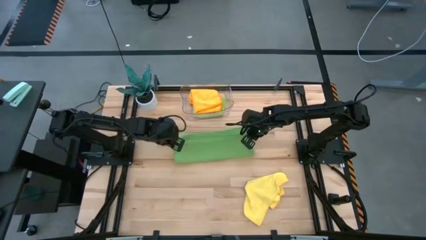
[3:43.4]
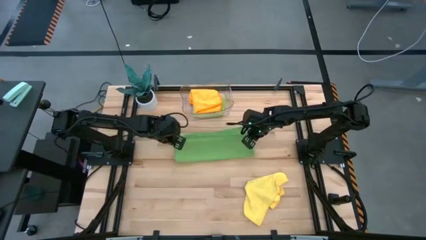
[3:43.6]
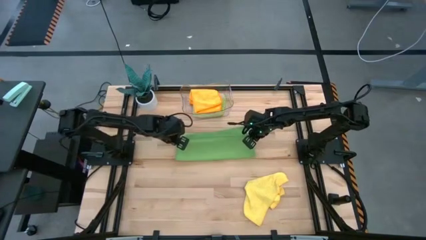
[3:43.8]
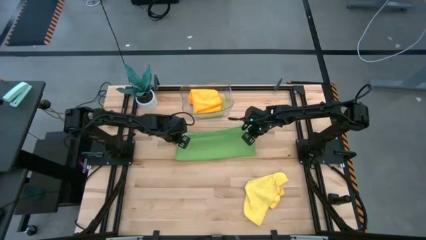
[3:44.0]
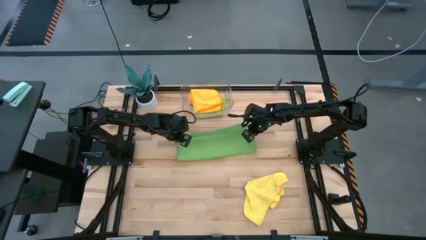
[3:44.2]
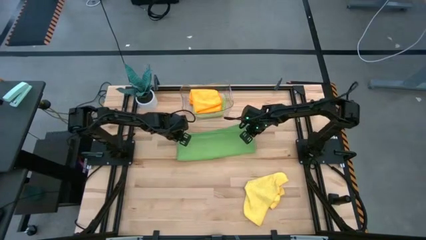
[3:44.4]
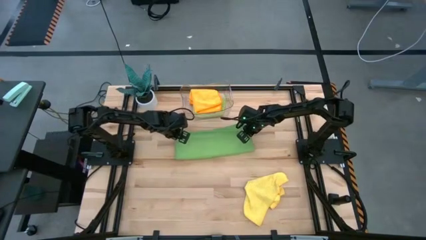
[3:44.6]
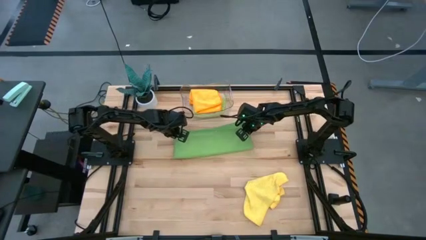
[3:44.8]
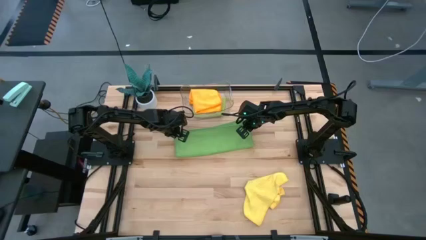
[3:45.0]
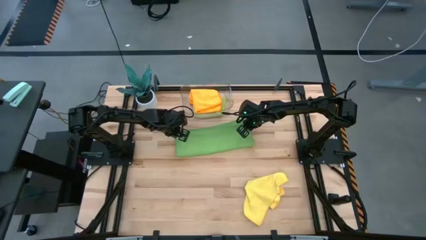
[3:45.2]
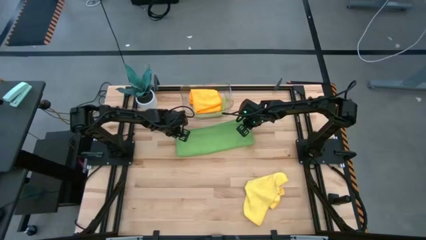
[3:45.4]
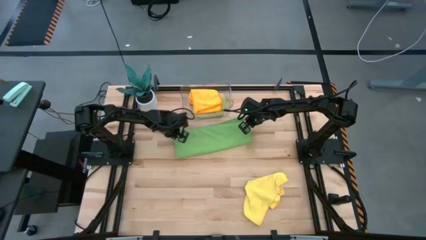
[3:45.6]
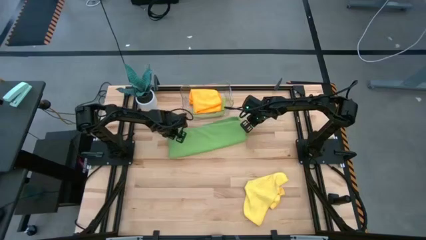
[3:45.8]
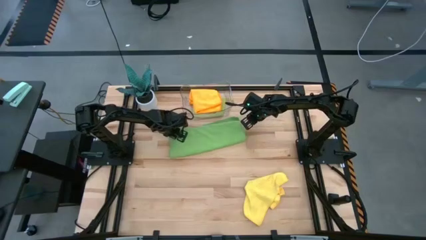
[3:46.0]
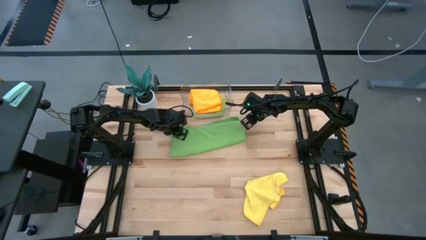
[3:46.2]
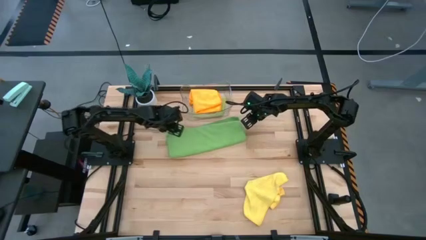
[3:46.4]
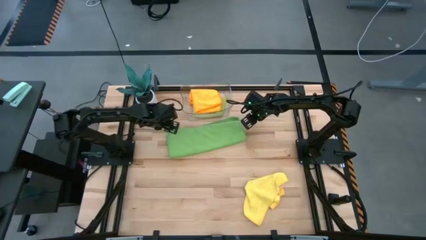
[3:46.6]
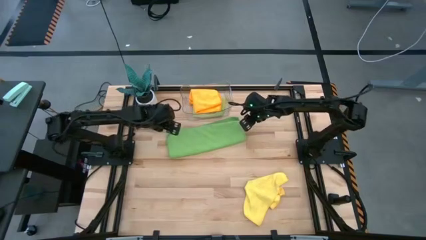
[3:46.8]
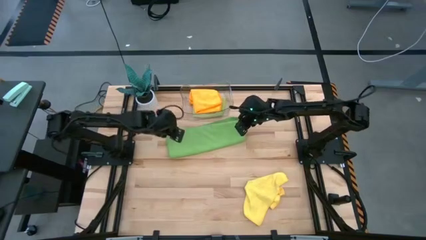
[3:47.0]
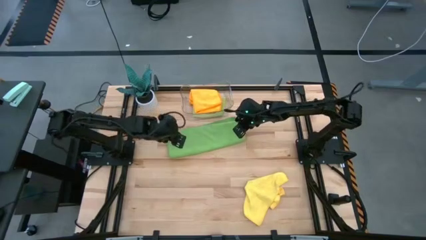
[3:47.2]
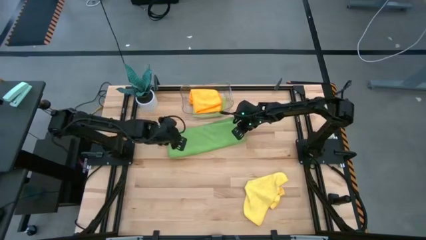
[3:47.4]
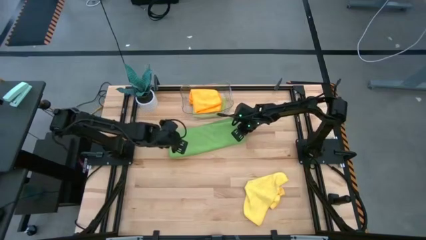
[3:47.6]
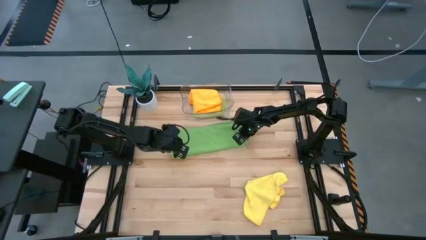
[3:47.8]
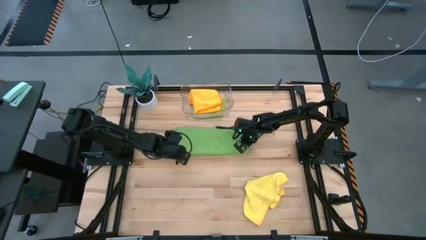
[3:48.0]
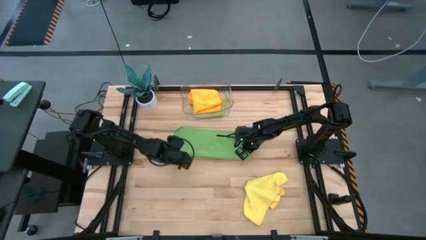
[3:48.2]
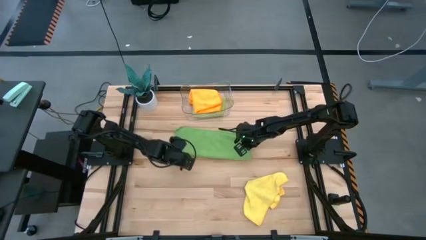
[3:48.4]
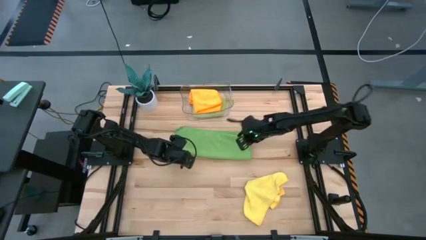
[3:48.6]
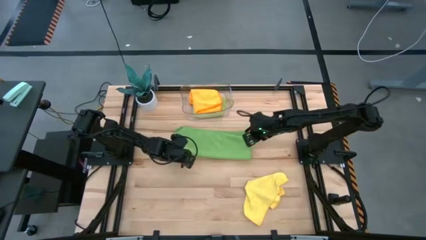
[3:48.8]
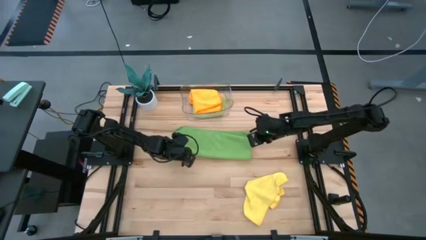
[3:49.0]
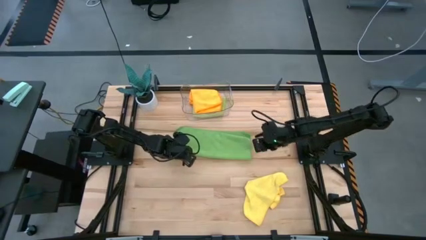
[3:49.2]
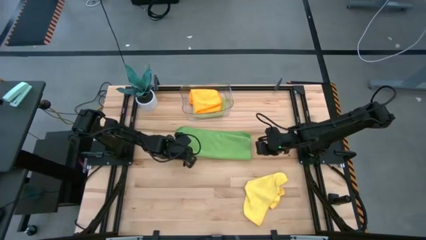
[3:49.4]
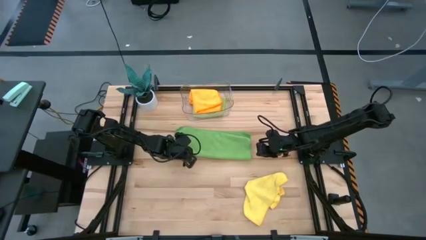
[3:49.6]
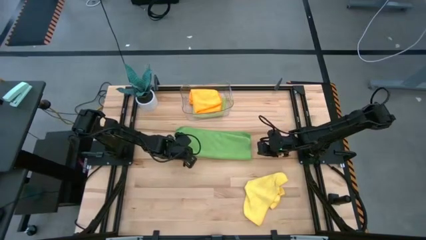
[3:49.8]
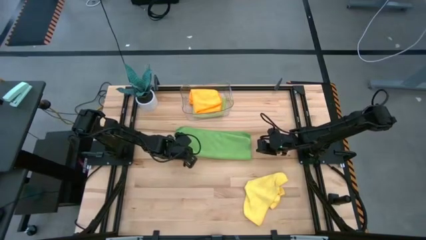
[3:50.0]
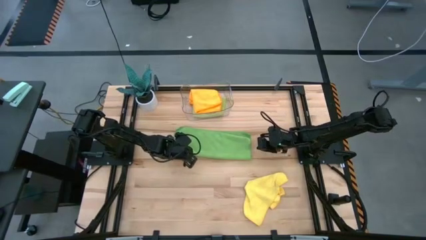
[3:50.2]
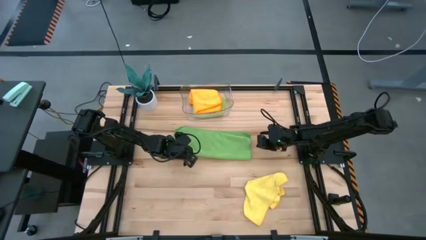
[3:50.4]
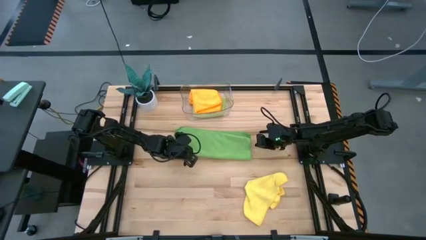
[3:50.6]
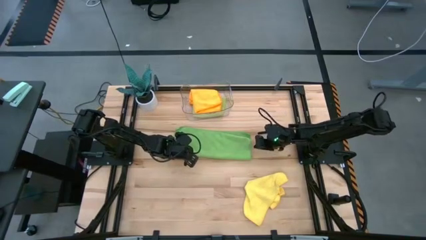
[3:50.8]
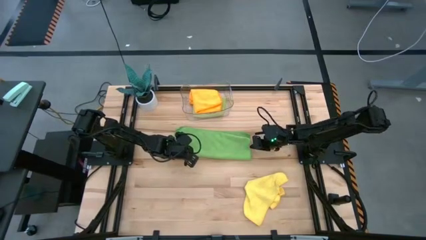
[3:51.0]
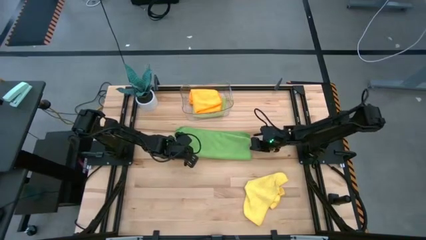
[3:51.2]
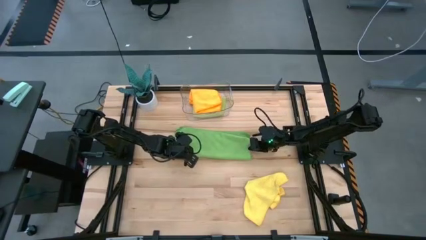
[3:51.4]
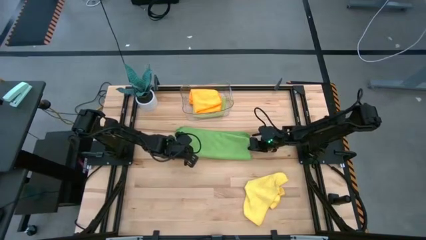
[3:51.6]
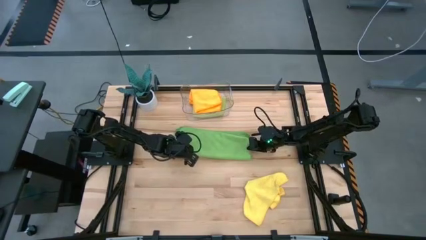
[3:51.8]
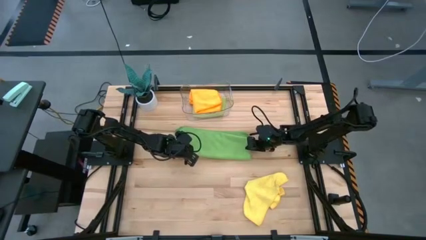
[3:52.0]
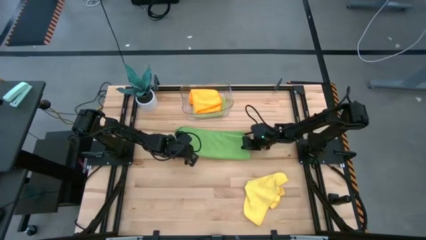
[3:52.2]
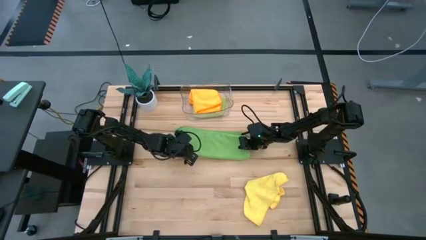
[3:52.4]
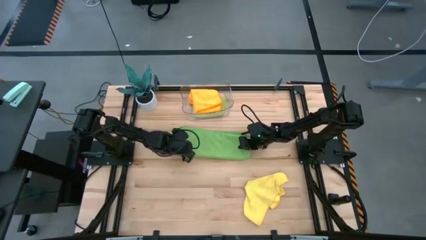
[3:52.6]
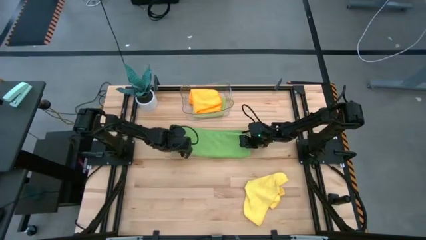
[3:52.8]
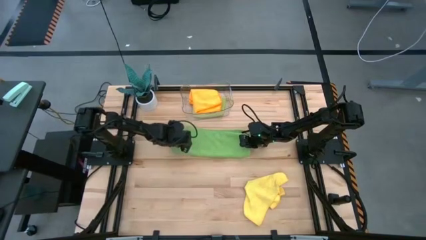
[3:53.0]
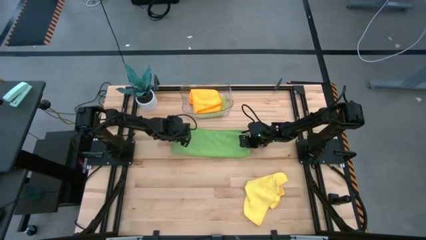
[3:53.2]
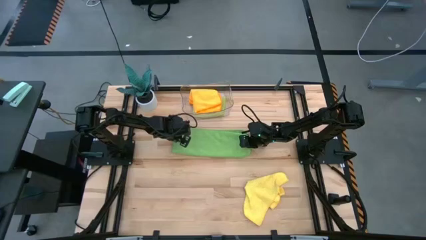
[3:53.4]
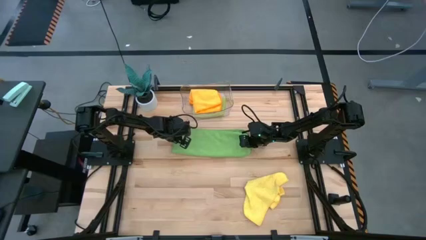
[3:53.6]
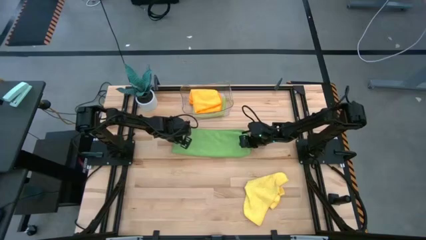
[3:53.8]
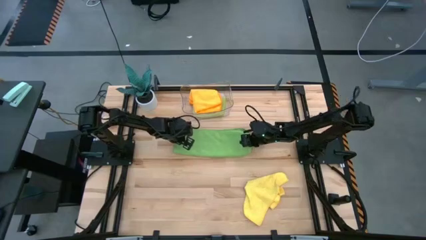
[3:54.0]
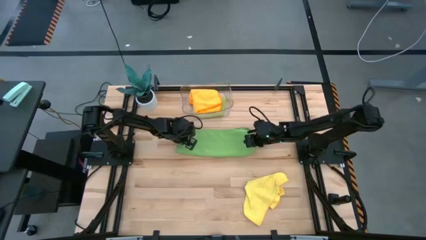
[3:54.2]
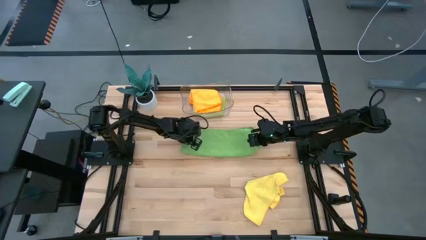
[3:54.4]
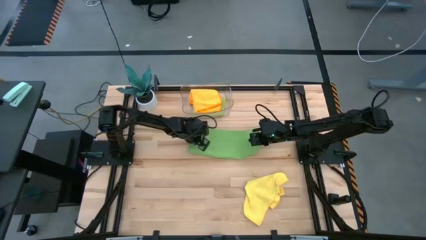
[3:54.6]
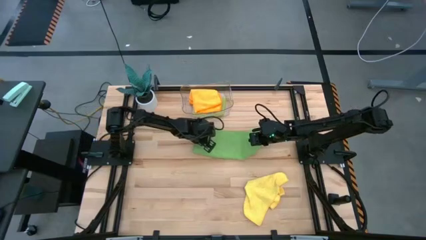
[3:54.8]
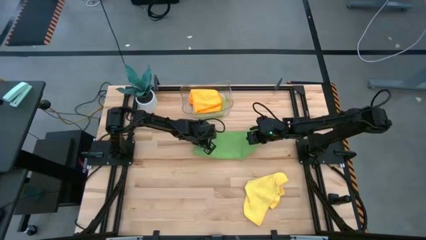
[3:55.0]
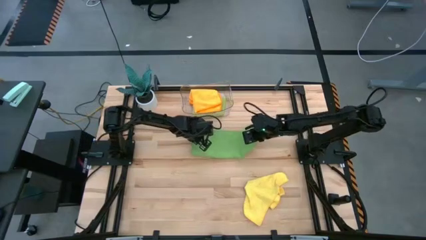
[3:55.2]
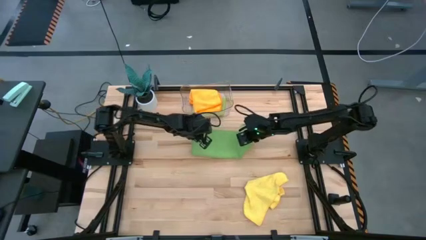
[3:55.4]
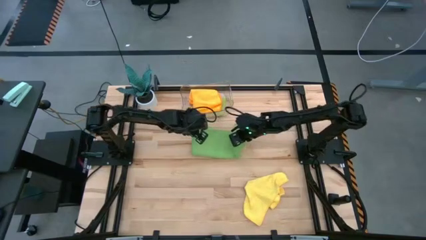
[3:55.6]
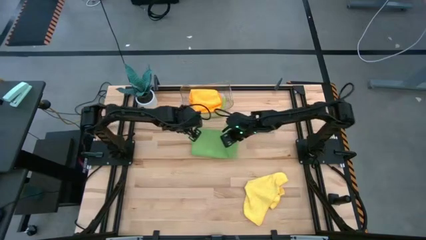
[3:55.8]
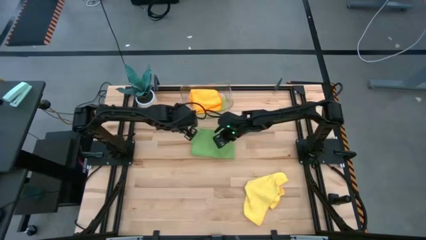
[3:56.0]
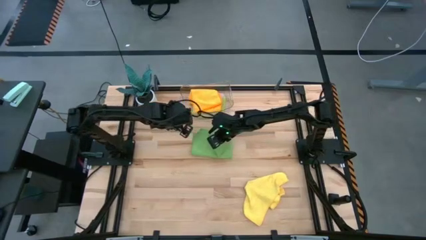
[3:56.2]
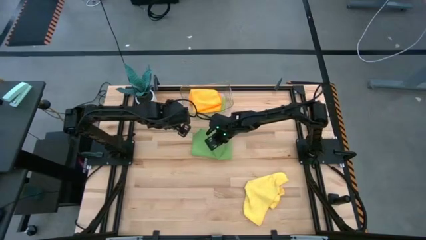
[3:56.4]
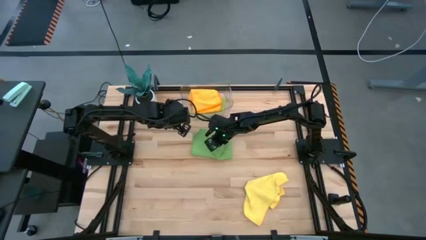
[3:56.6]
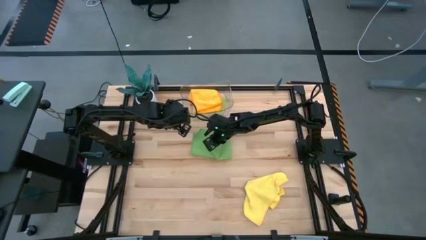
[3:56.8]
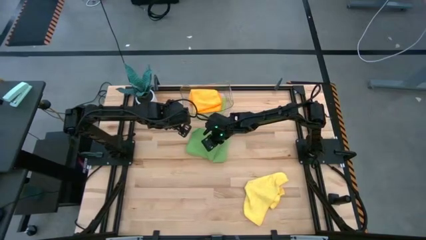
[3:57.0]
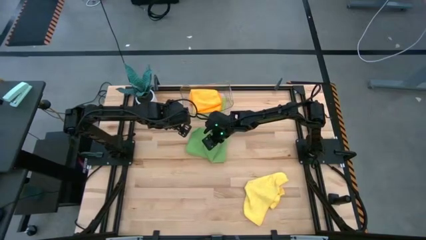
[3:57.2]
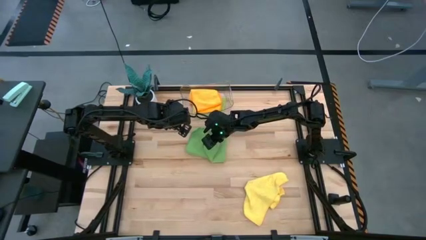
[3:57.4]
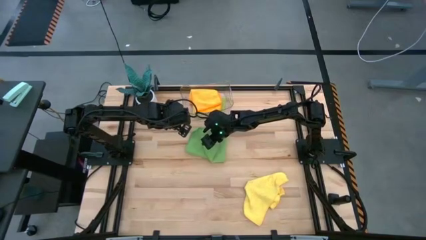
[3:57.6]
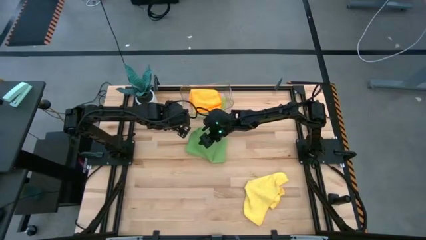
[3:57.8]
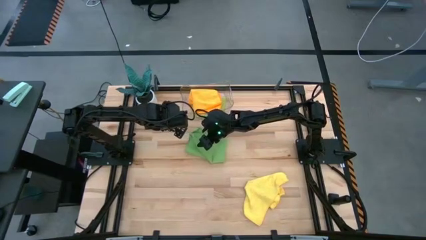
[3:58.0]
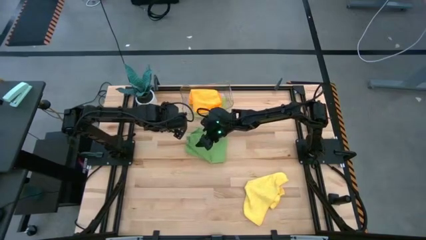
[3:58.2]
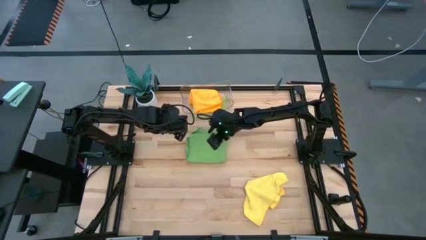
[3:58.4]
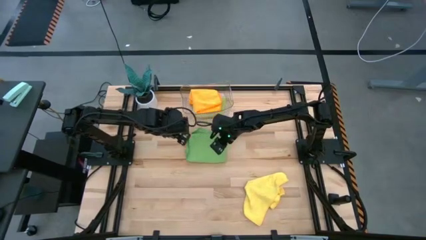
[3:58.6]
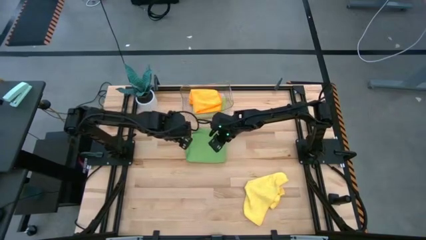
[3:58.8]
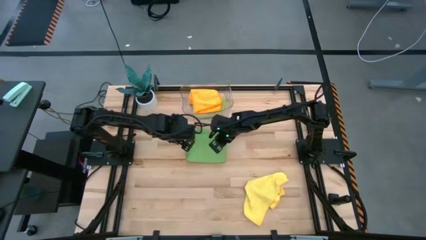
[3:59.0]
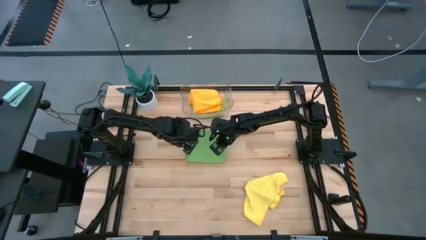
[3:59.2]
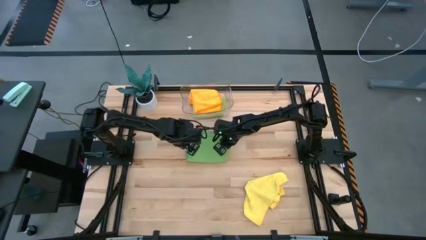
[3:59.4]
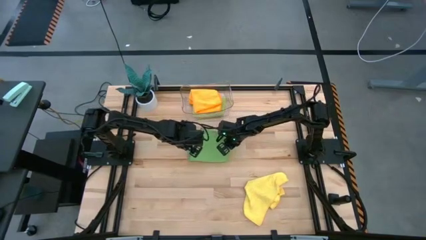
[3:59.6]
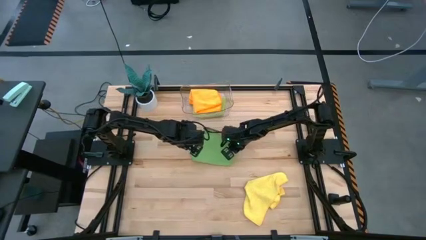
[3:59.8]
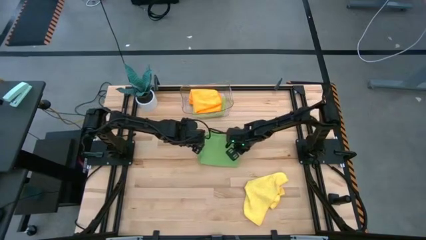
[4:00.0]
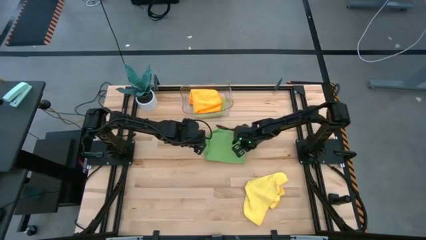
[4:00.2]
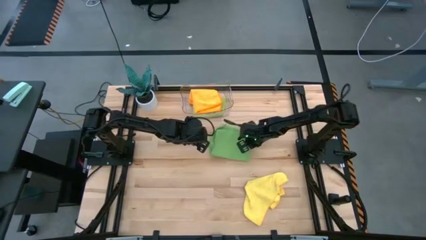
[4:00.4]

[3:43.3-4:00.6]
Task: Fold microfiber towels
Fold the green microfiber cloth
